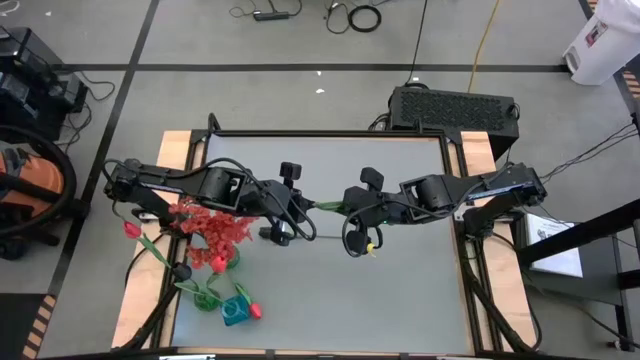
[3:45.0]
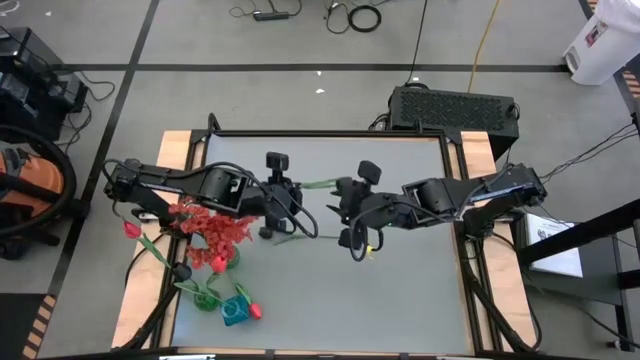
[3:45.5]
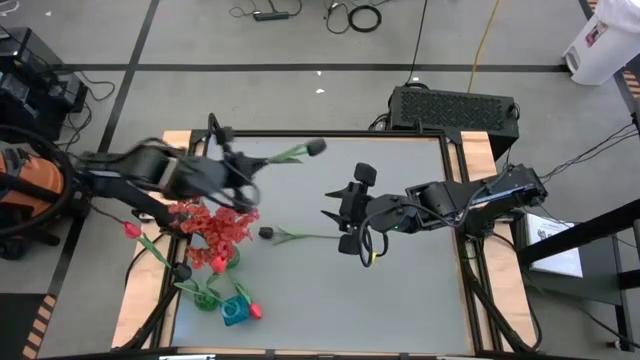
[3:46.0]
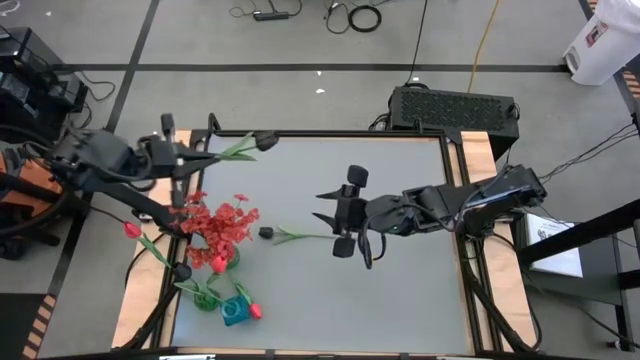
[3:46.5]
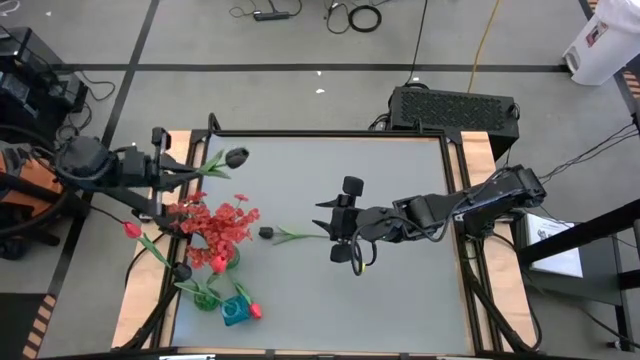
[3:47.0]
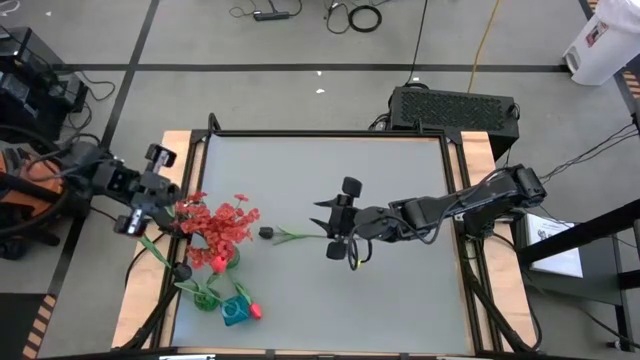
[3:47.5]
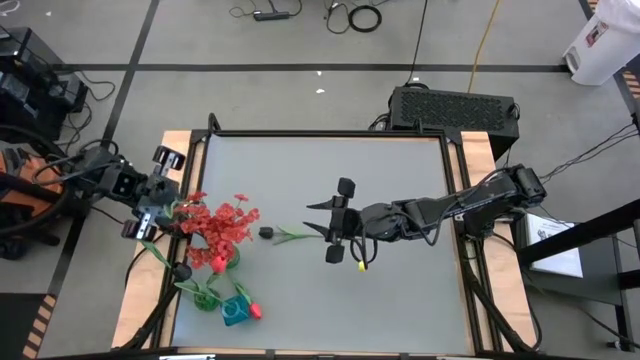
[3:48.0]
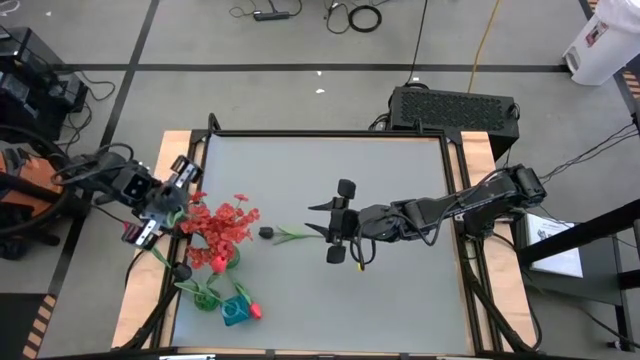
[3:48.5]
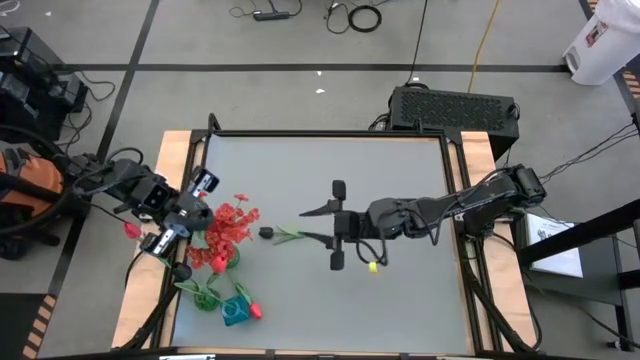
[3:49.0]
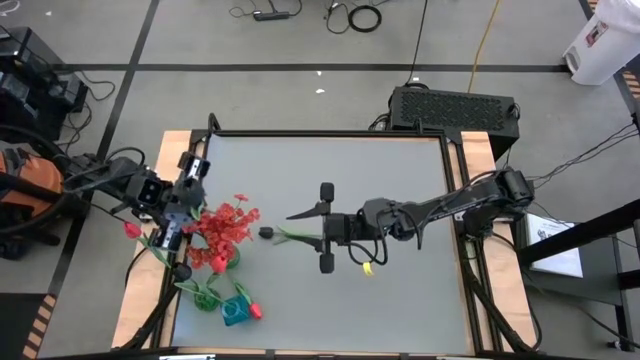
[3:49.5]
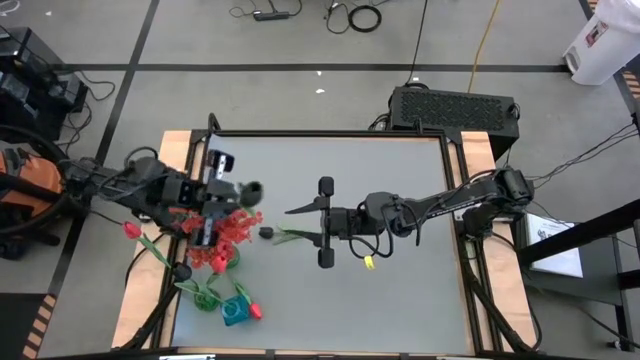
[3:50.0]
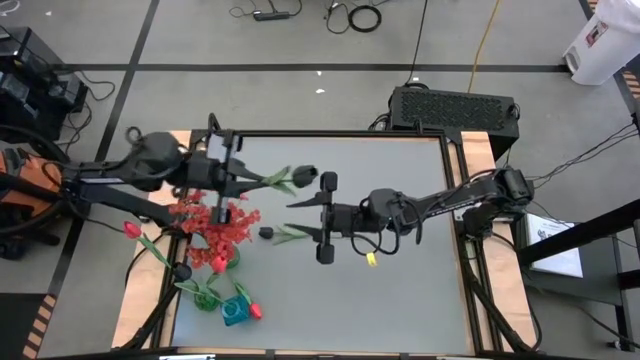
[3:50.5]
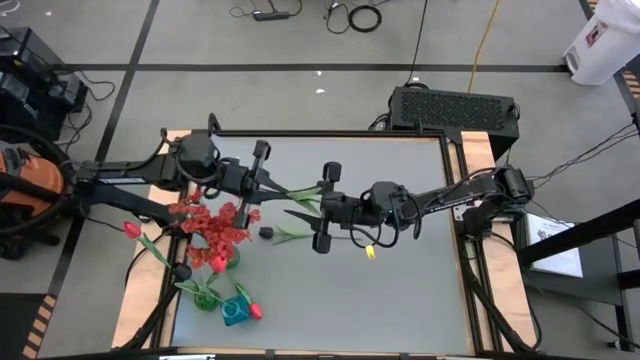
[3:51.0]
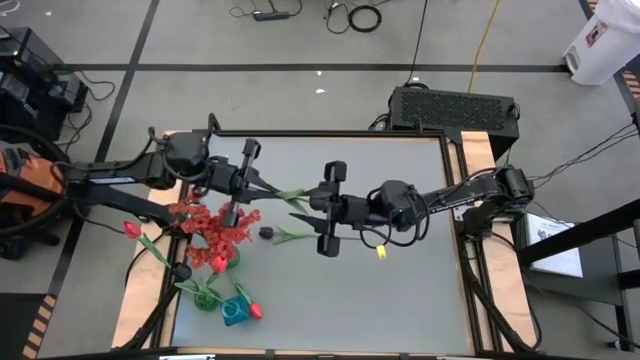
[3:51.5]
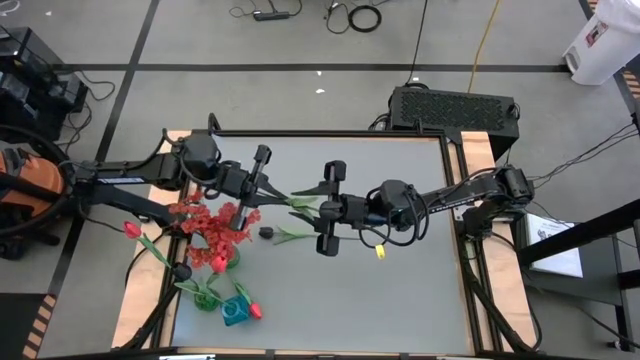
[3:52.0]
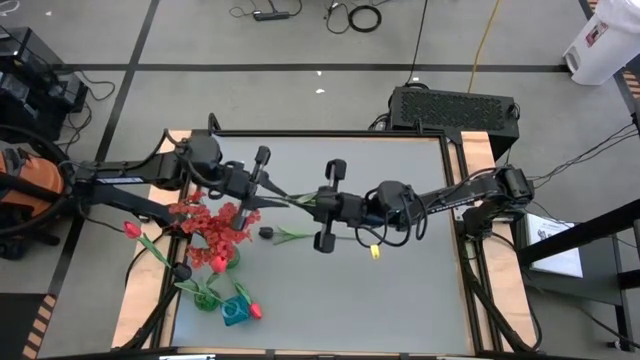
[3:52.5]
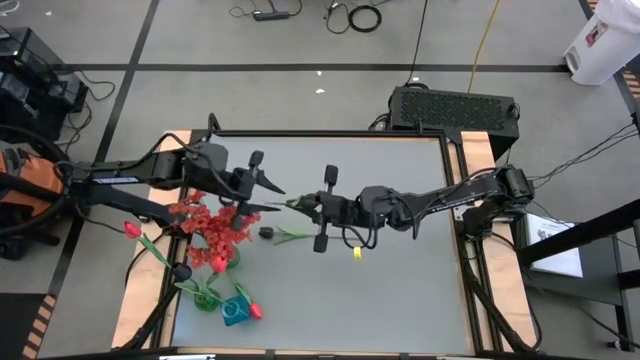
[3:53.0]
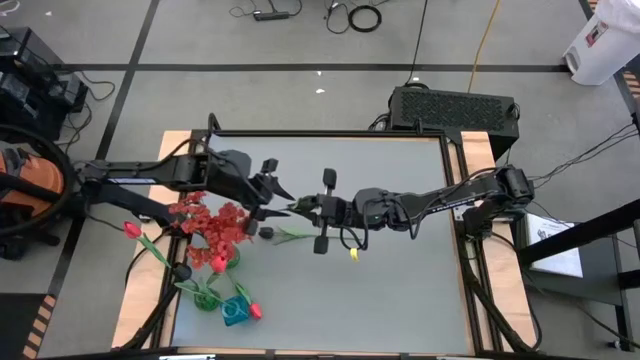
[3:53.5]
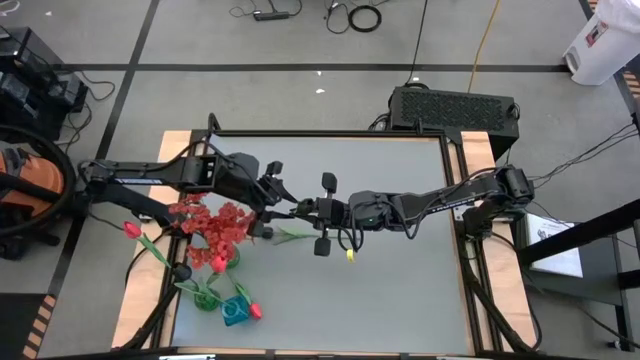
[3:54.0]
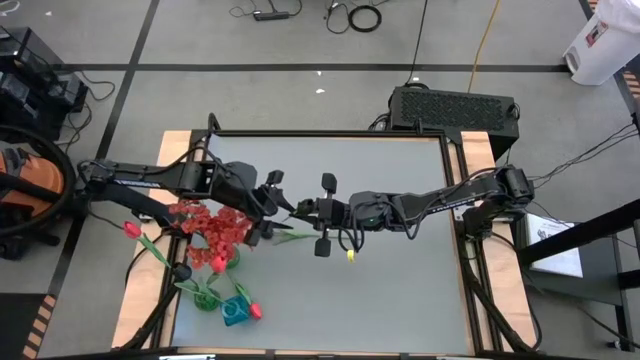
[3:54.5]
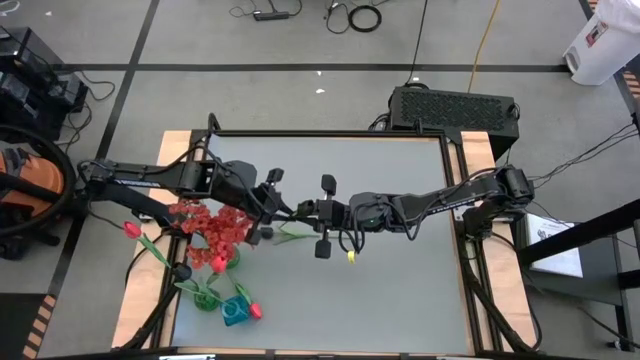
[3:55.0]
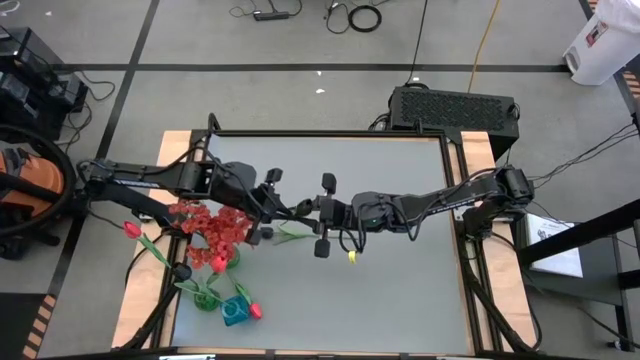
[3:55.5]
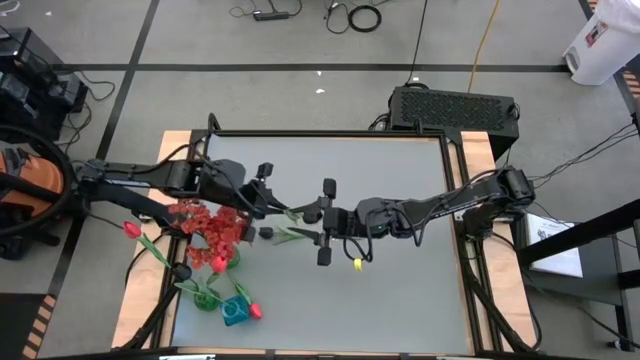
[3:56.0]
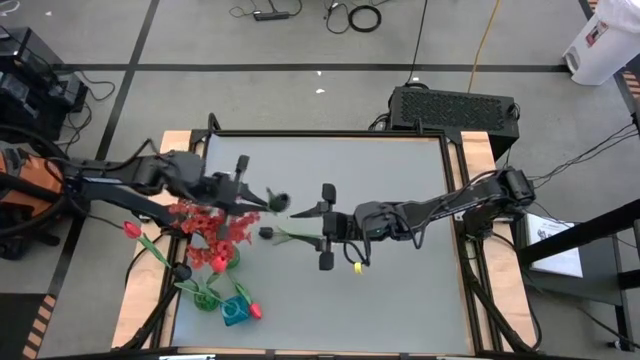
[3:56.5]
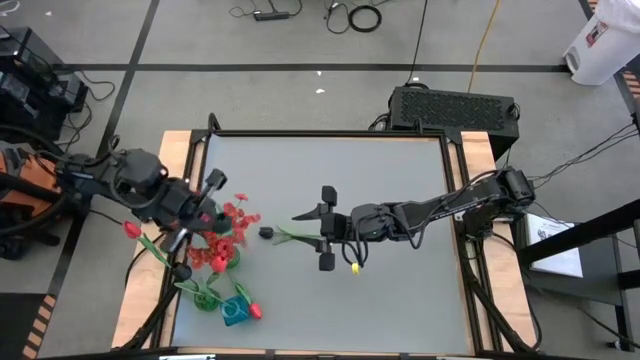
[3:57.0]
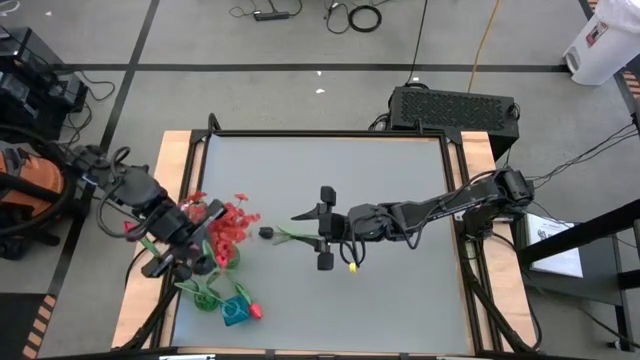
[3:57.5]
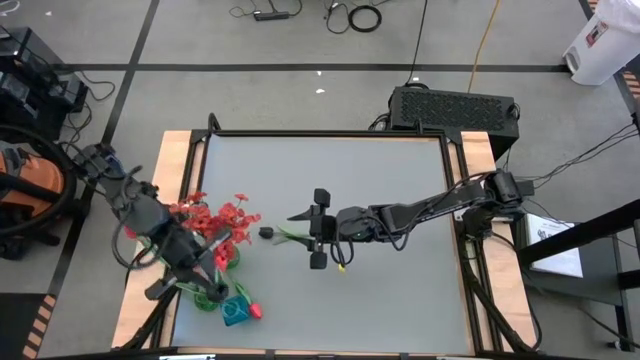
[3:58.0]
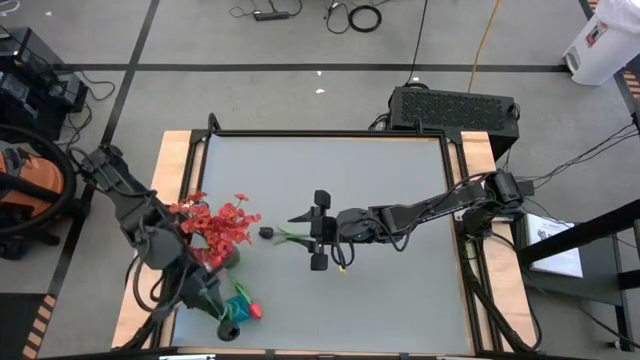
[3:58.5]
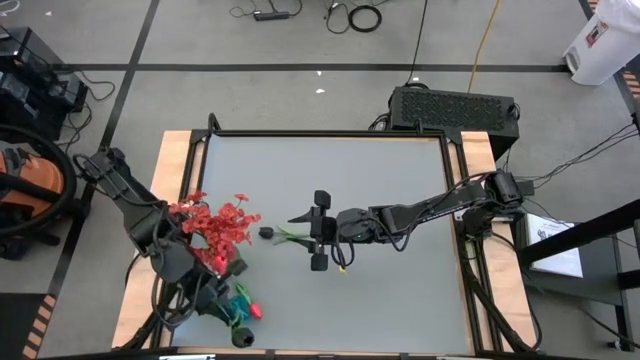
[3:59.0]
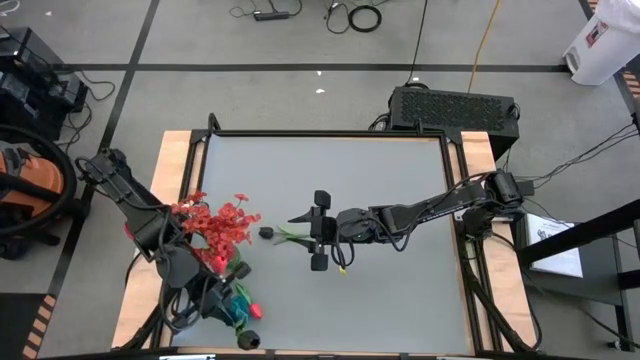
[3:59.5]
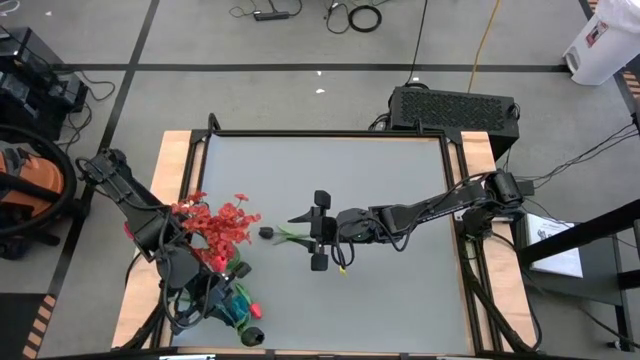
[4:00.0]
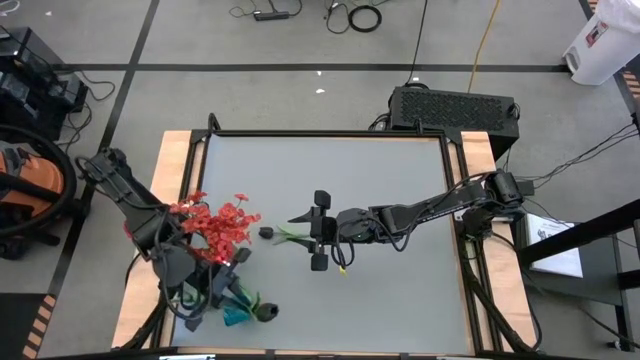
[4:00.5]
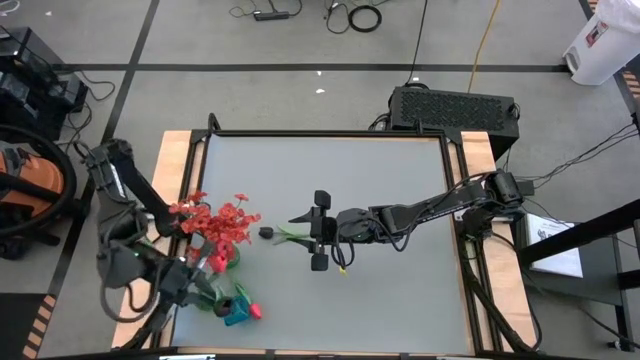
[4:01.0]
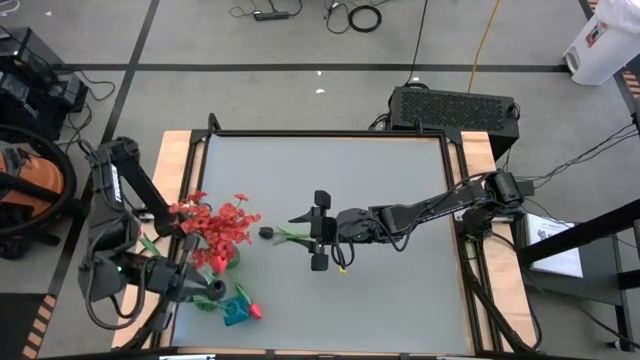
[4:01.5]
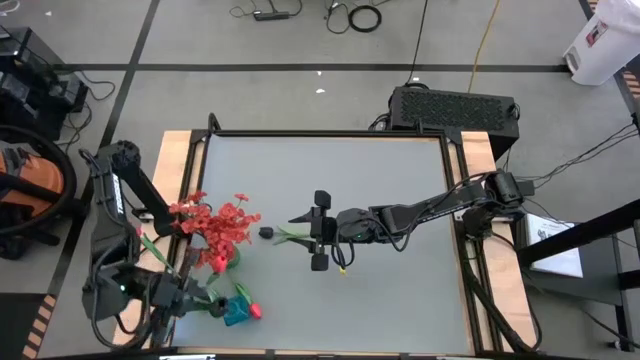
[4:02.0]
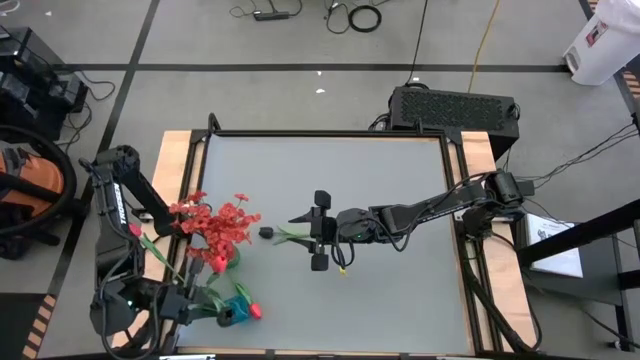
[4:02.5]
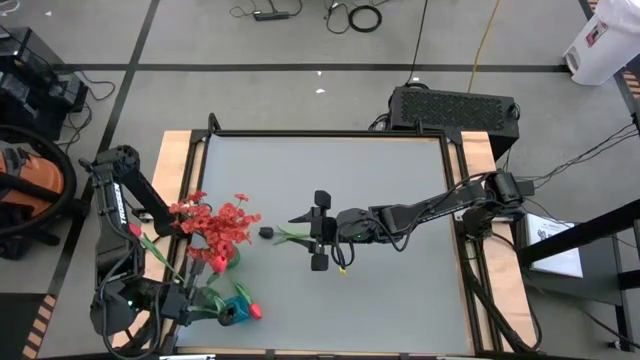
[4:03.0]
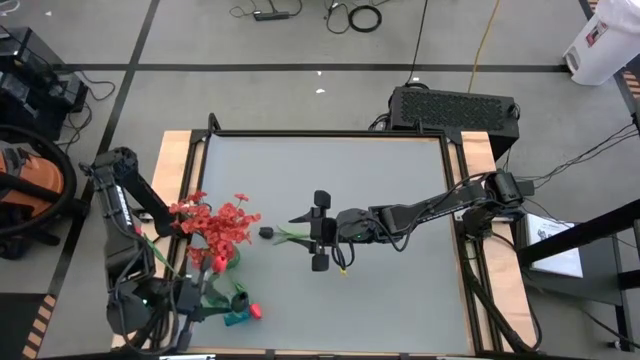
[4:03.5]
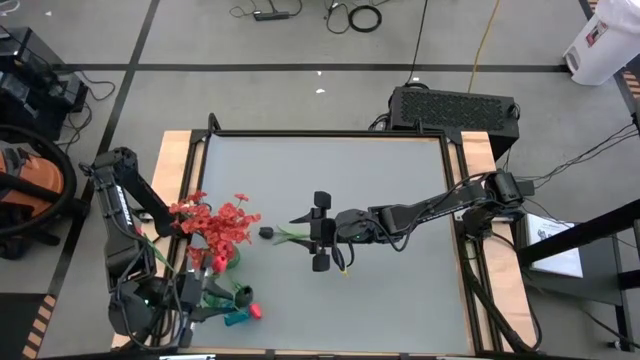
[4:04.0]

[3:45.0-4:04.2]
Task: Sort flowers into vase by color
Put the right black flower into the blue vase

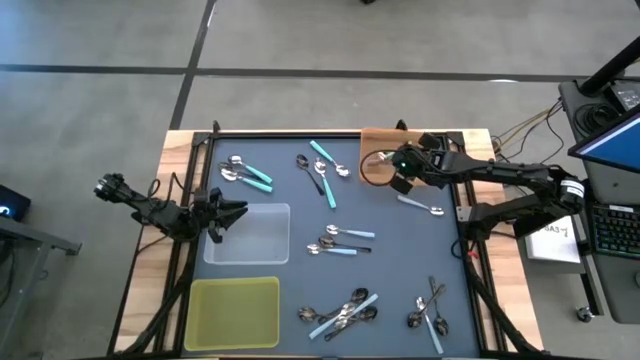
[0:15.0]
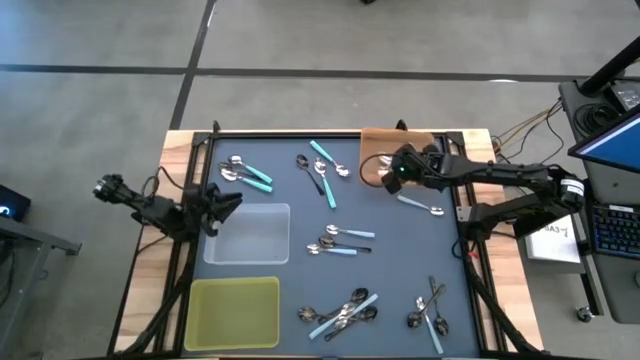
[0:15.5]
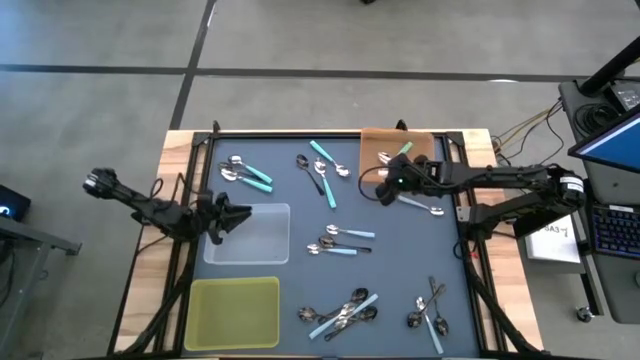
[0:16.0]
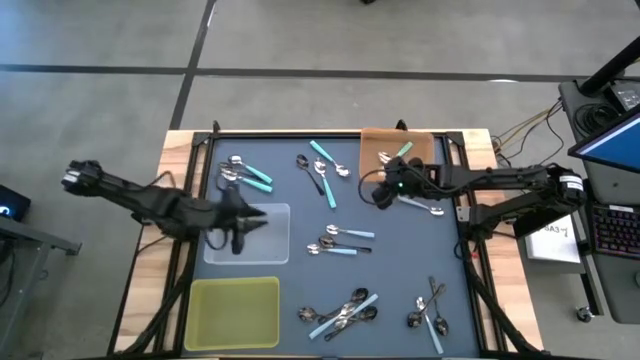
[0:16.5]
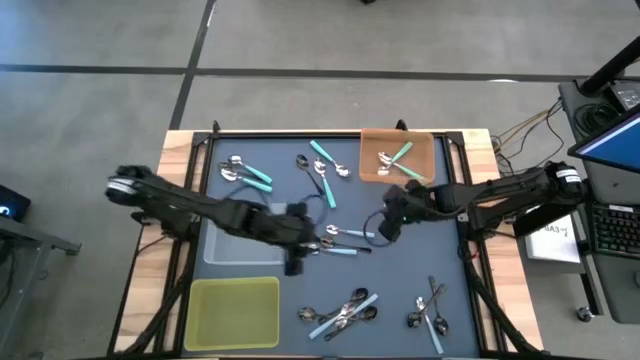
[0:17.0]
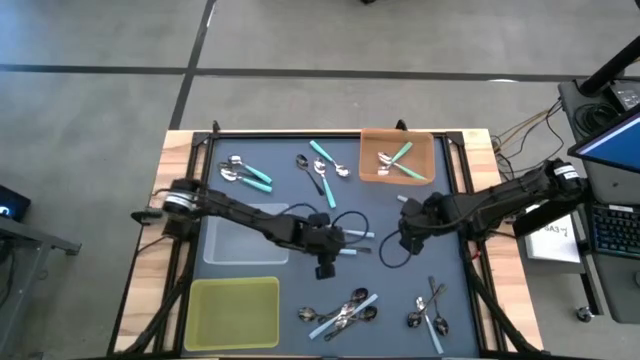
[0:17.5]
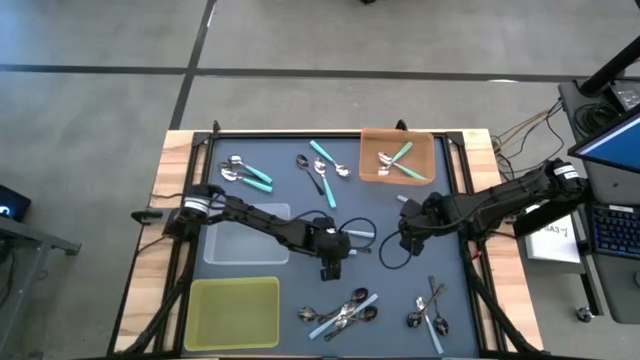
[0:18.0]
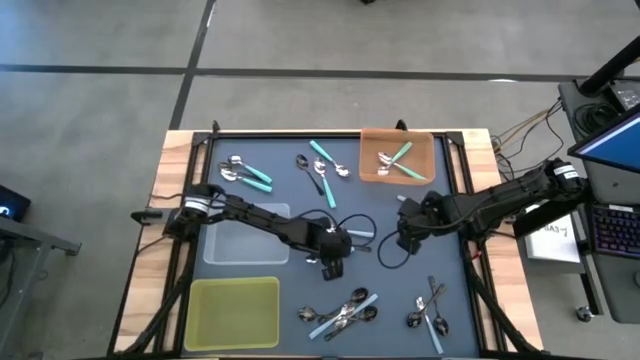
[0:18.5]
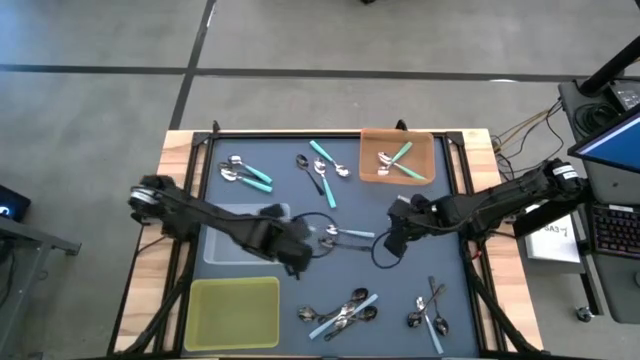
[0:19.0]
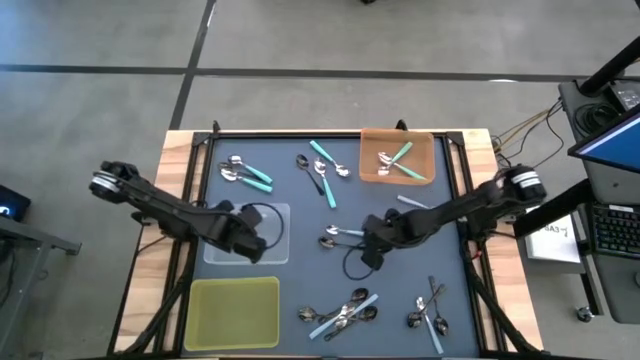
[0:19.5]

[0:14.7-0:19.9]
Task: Sort silverware by color (type)
Put the light blue spoon into the white bin
